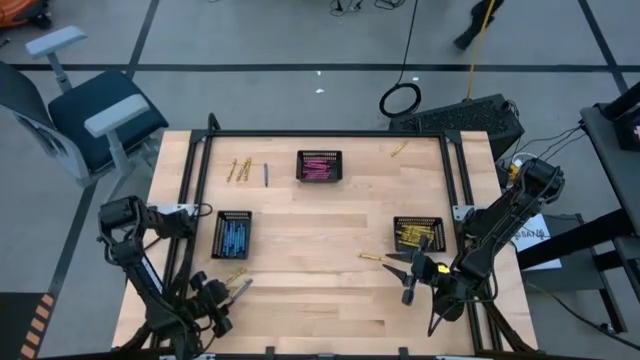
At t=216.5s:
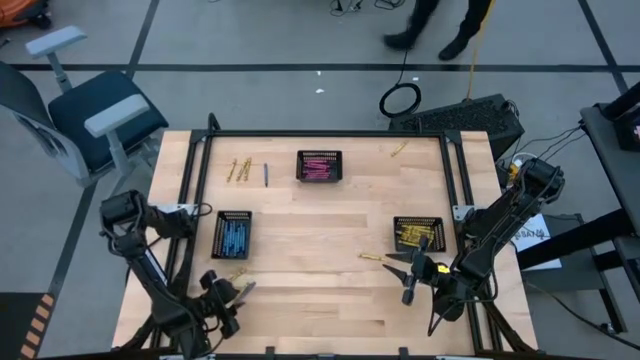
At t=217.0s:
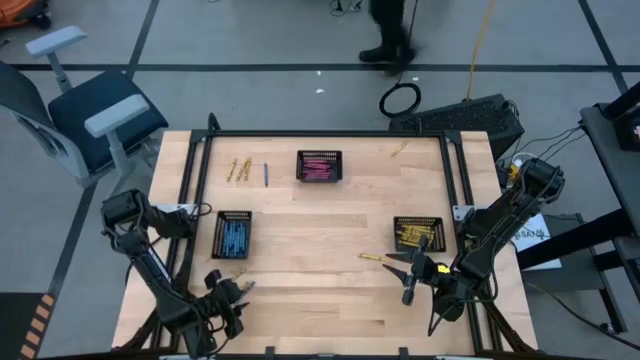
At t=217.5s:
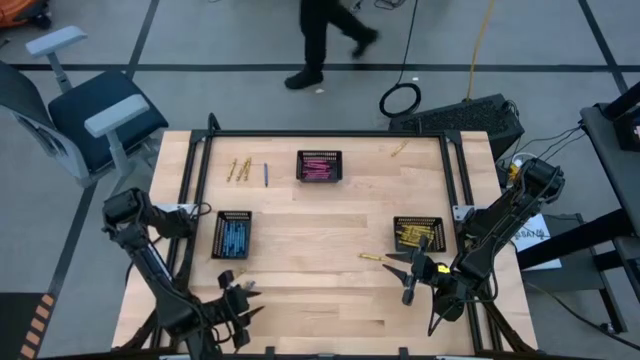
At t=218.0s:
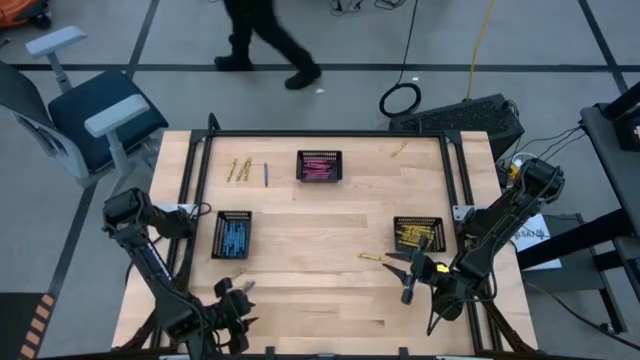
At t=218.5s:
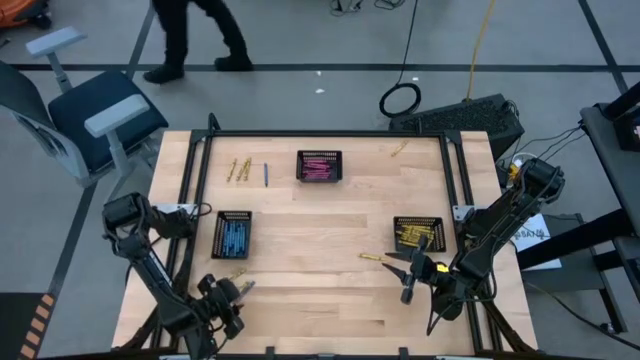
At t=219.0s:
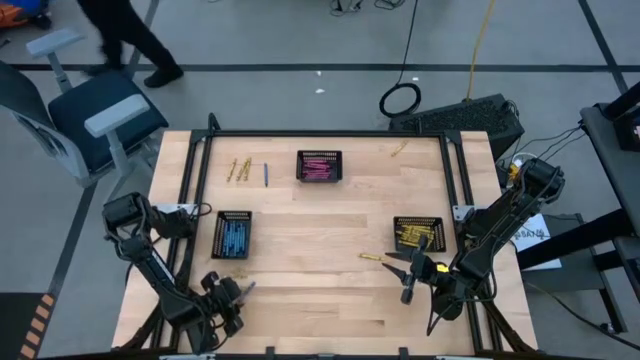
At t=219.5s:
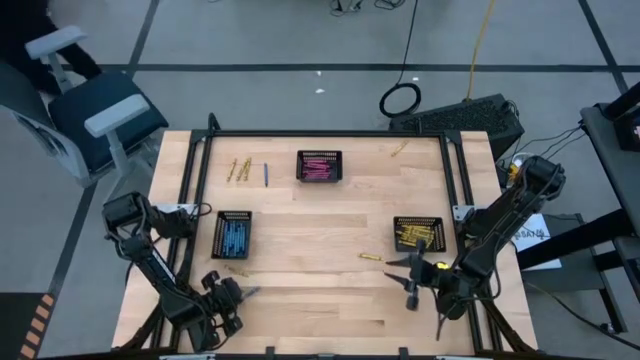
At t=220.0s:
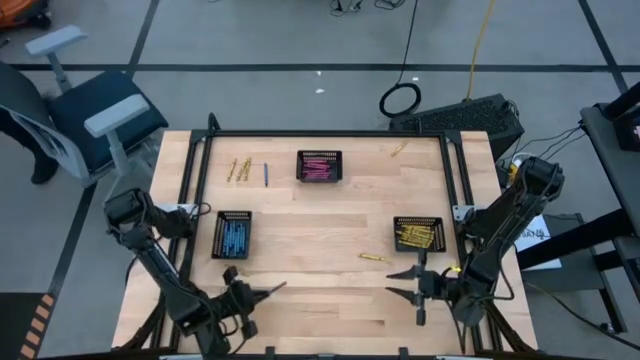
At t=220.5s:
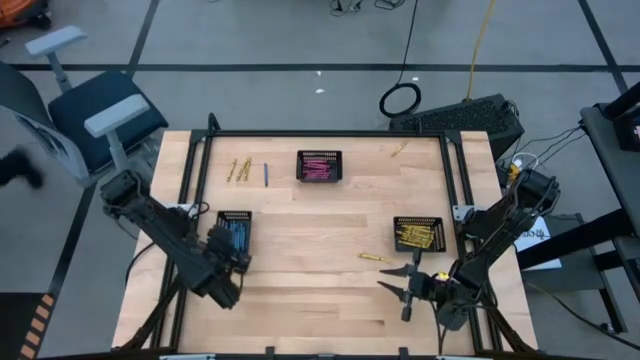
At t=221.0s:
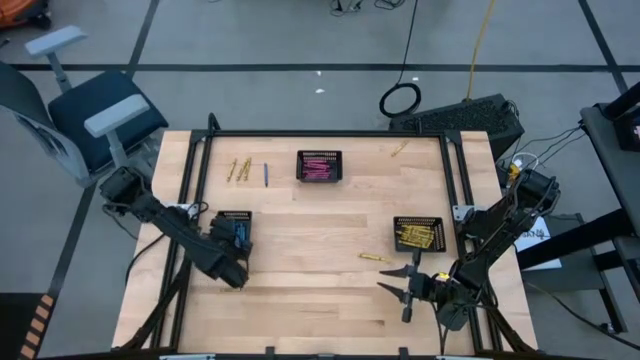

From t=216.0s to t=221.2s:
Task: Sort crayons
Put the bottom blue crayon into the bottom left black bin

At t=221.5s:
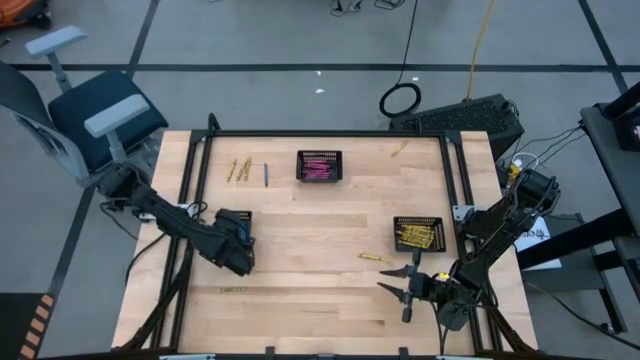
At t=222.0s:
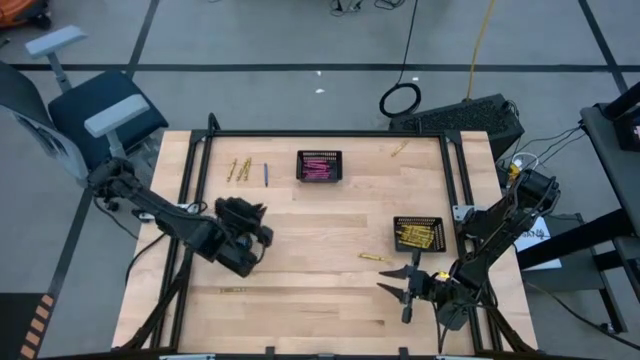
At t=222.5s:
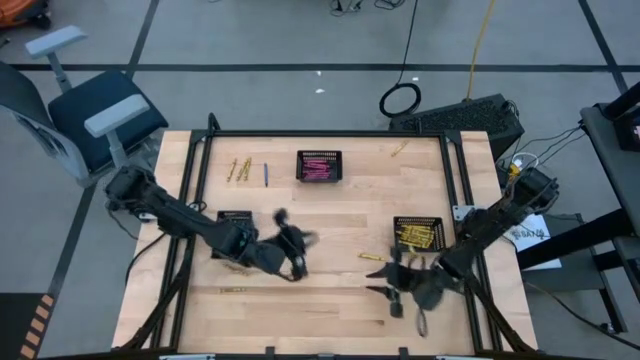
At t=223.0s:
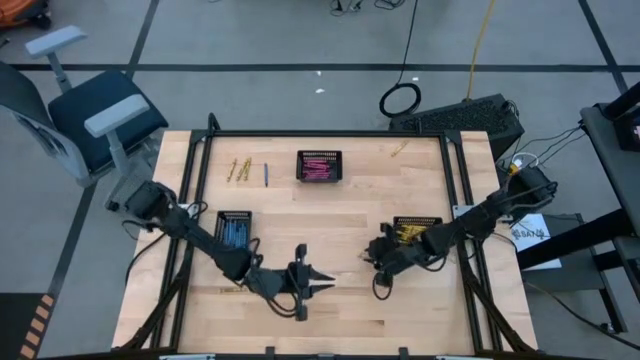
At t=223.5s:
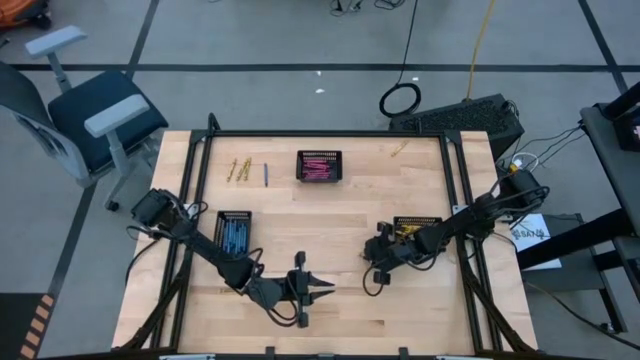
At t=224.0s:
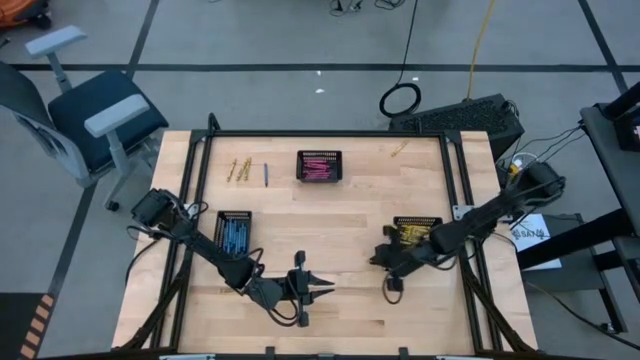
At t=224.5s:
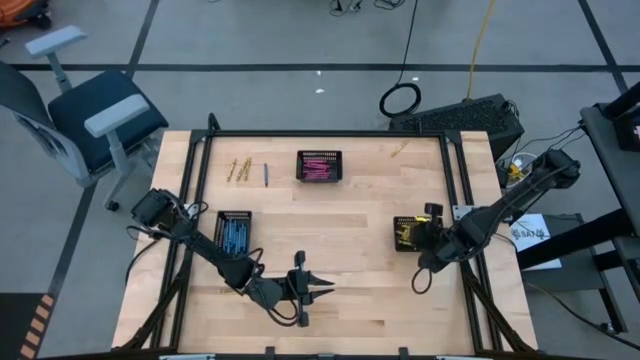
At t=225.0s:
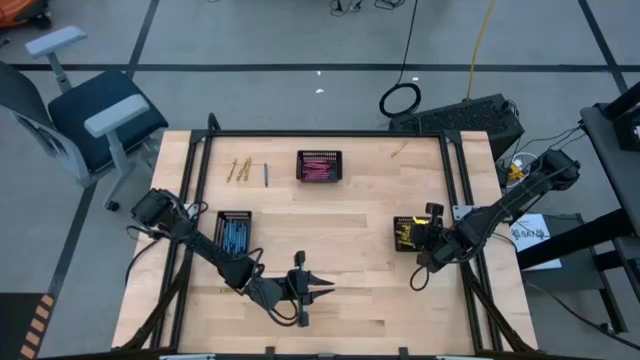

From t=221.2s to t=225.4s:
Put the yellow crayon into the bottom right black bin

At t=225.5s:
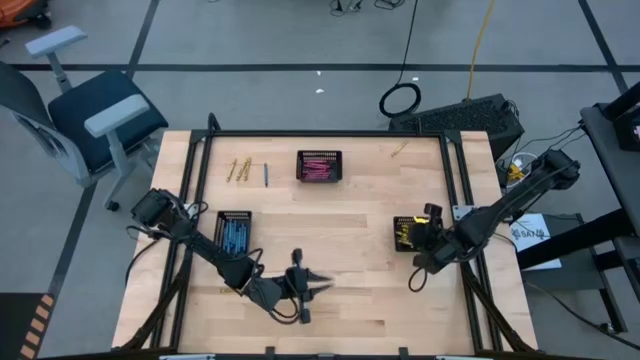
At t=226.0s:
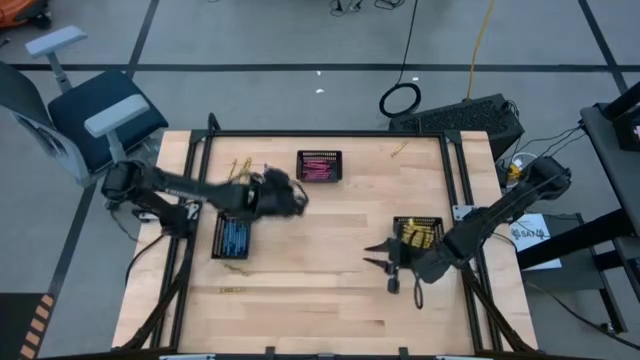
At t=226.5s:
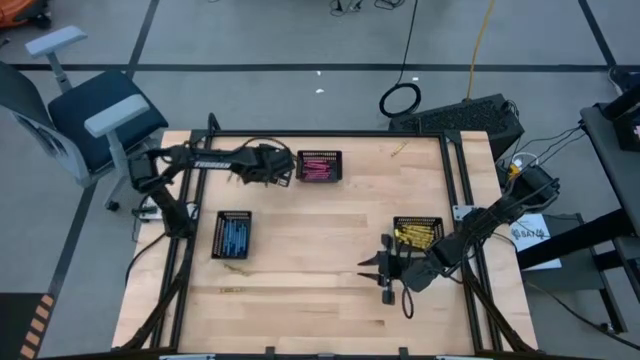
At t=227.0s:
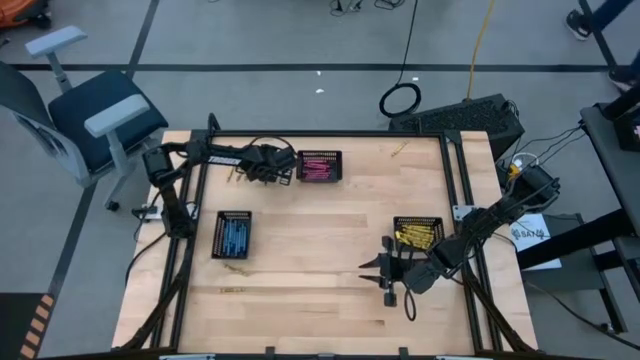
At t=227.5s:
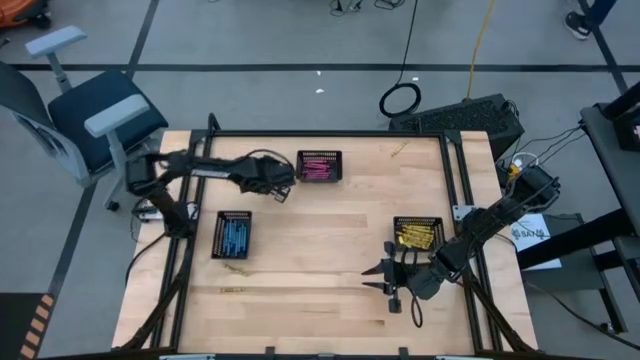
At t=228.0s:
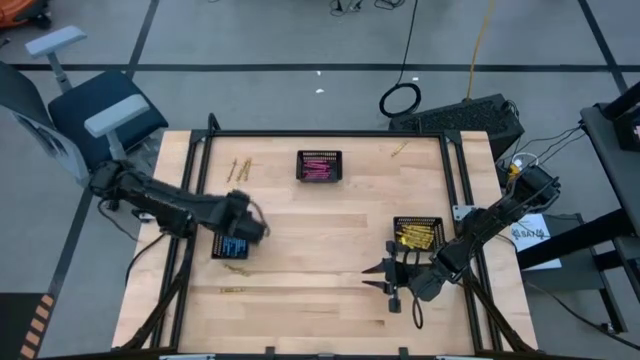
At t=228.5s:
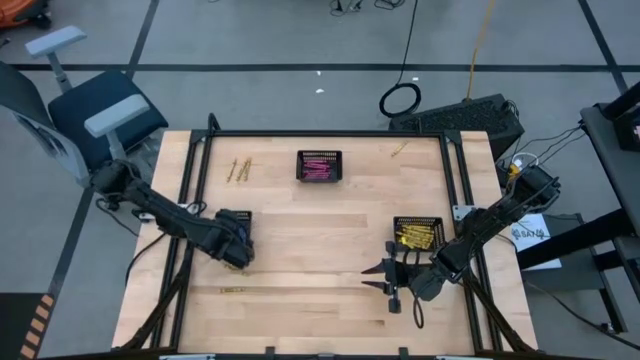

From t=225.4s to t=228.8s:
Put the blue crayon into the bottom left black bin

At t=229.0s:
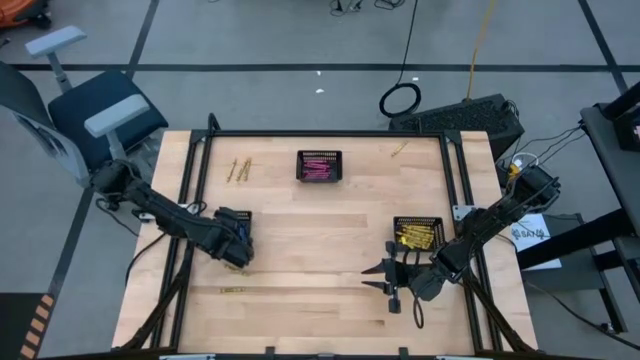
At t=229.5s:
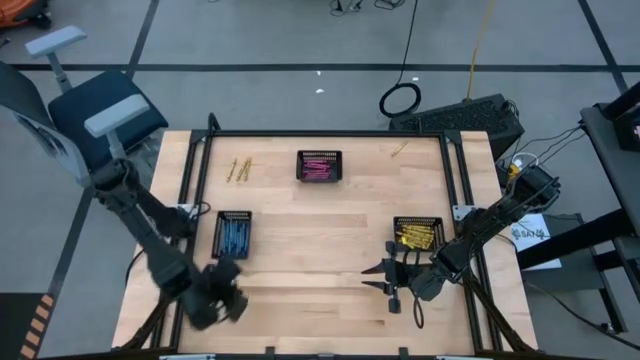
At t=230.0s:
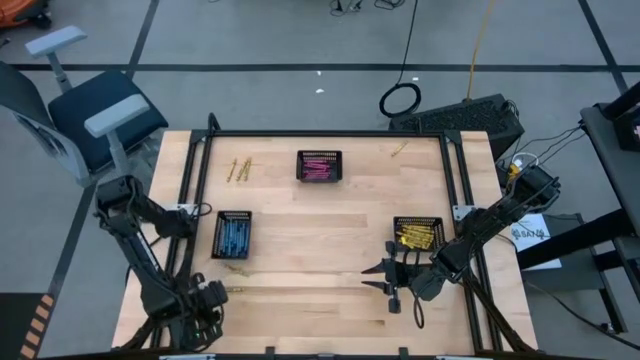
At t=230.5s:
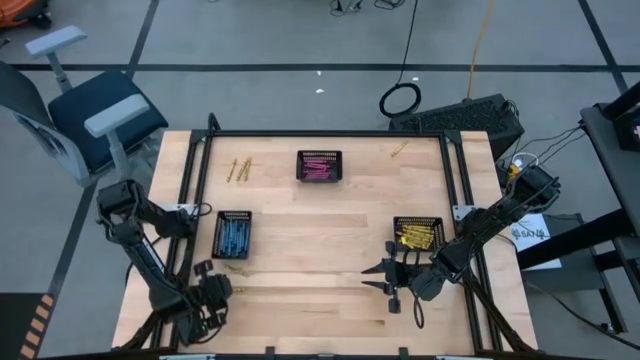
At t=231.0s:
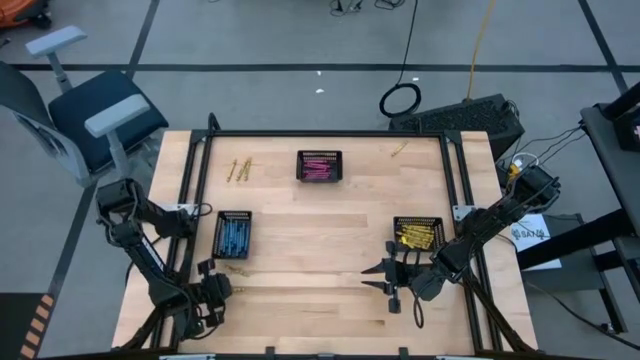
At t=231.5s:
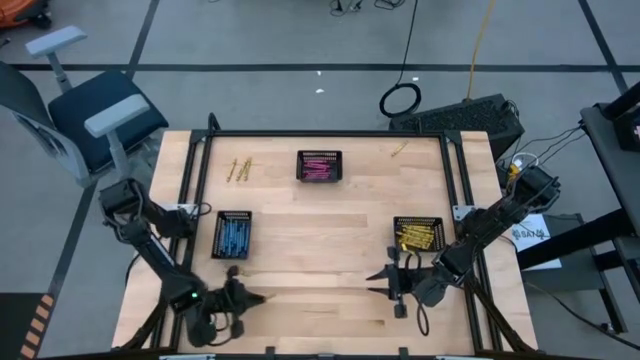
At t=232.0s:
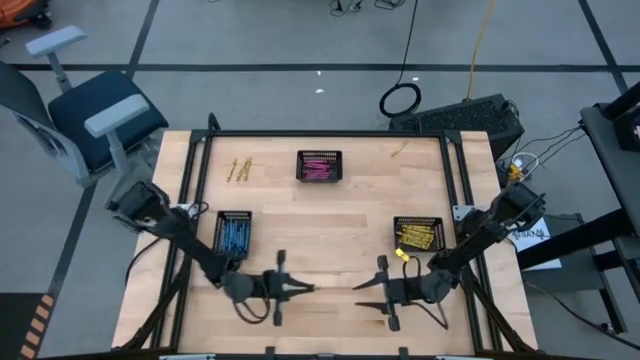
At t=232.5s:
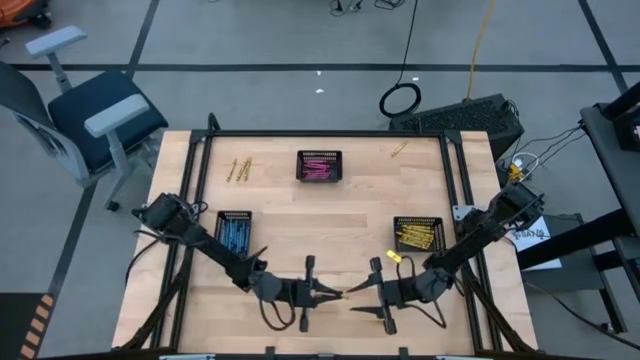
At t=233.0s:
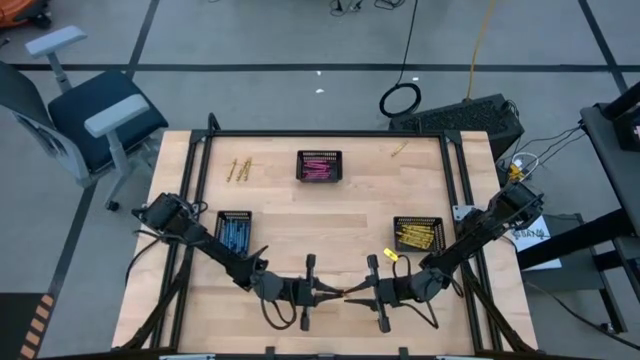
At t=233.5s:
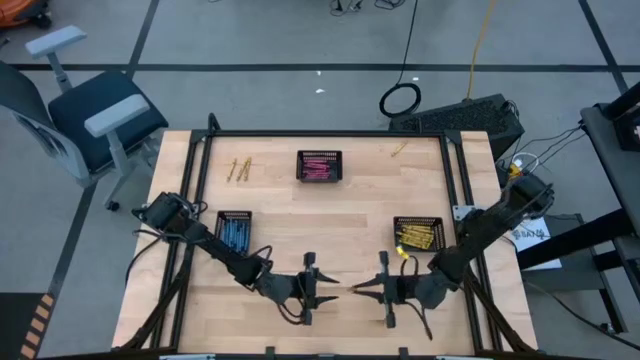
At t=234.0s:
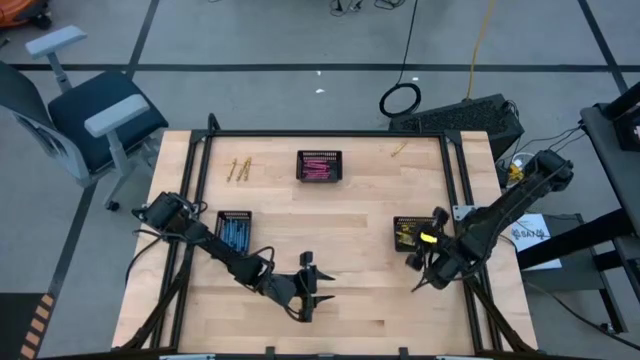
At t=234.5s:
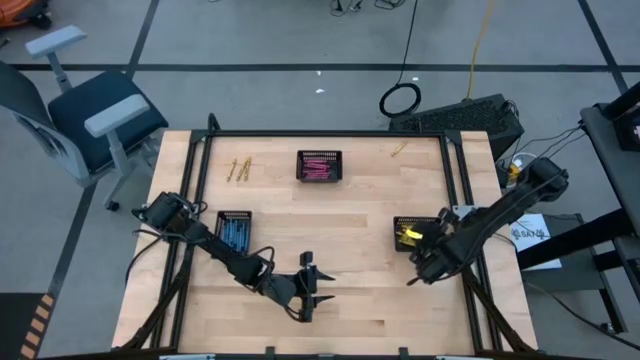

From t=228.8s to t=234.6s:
Put the yellow crayon into the bottom right black bin

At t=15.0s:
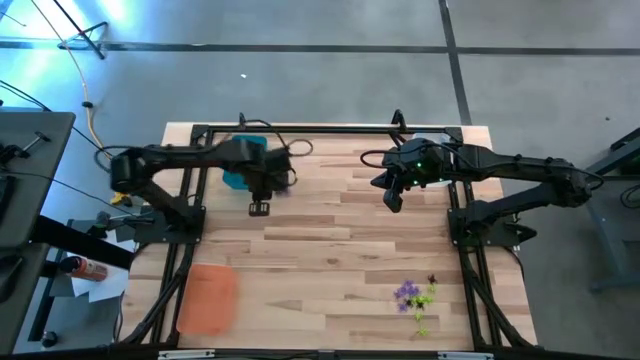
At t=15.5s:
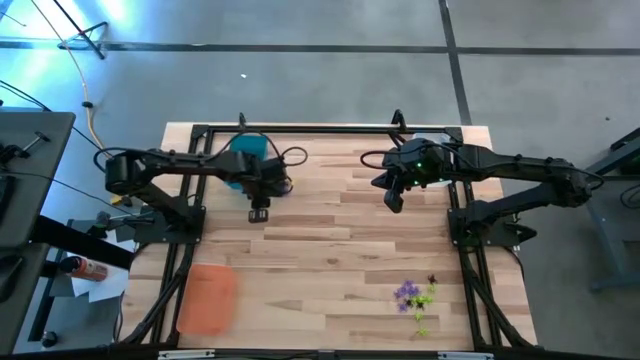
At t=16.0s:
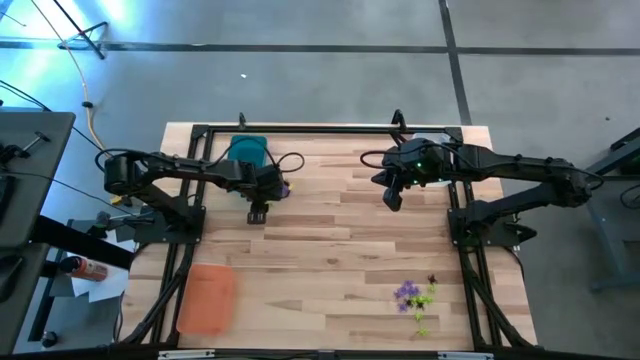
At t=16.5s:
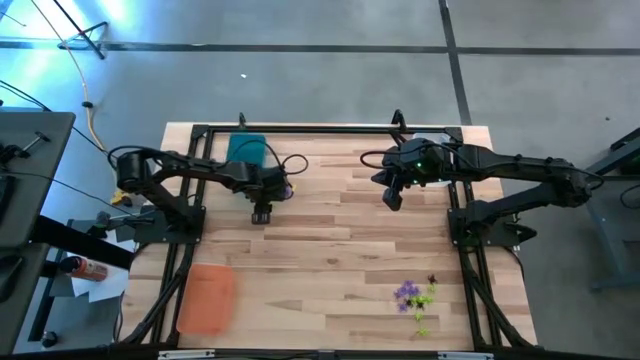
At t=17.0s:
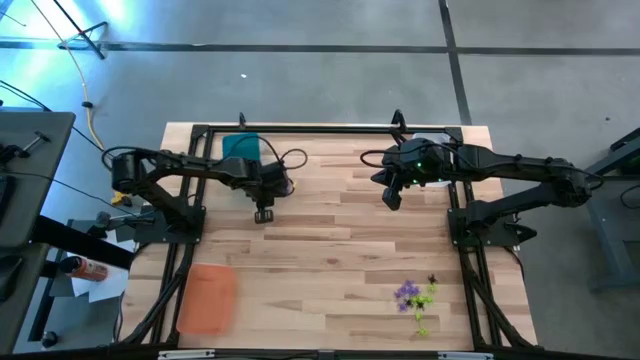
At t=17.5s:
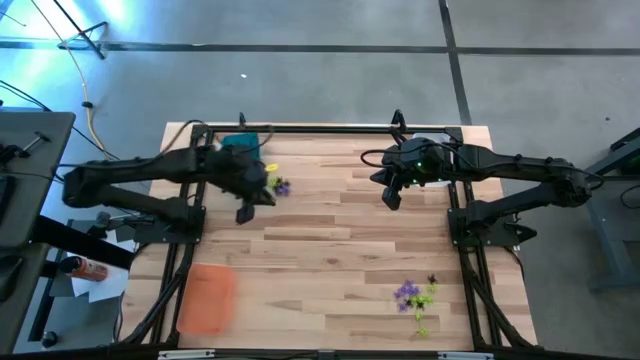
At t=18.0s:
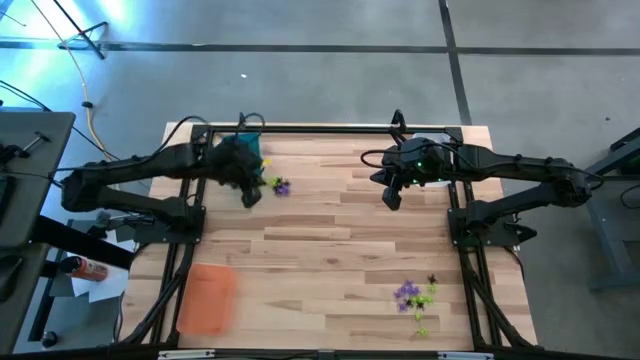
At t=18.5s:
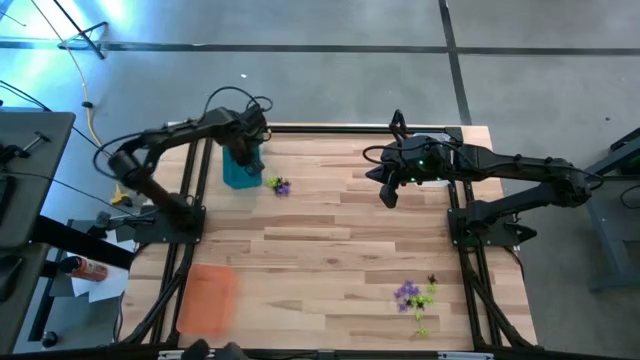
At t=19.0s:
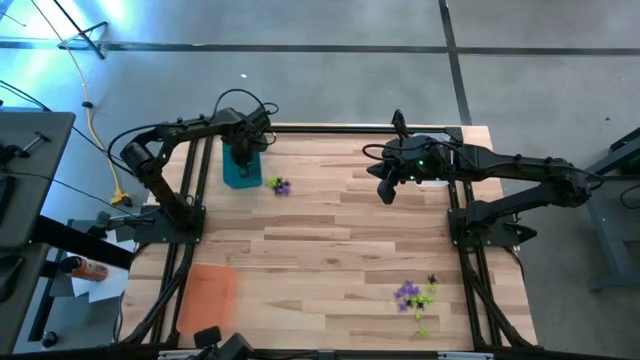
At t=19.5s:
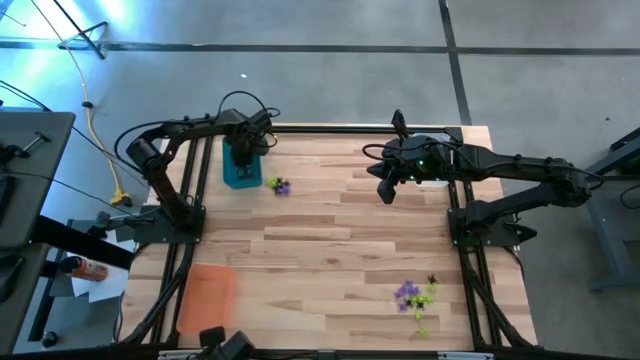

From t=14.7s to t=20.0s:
Task: Sort Halloween decoration
Put the green spider toy into the blue bin
